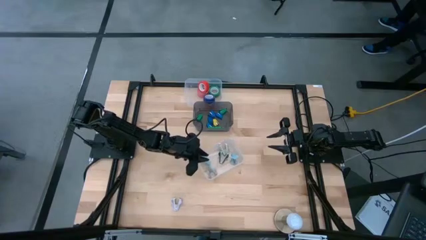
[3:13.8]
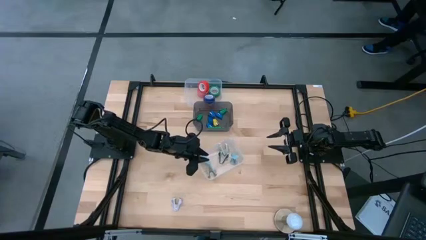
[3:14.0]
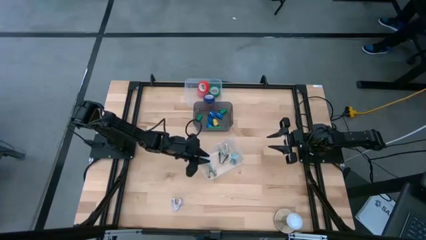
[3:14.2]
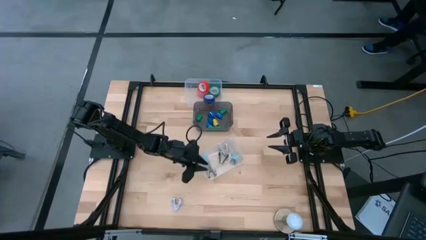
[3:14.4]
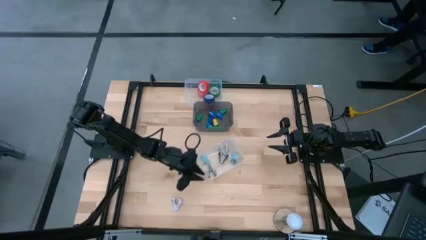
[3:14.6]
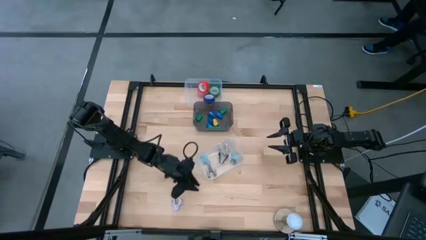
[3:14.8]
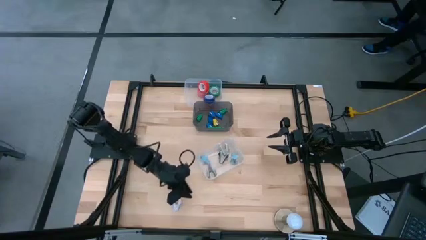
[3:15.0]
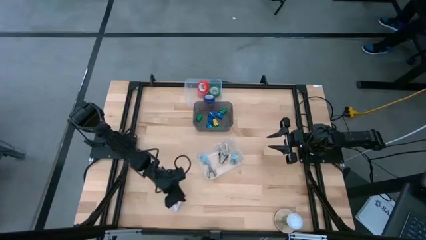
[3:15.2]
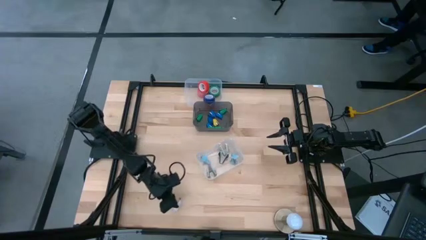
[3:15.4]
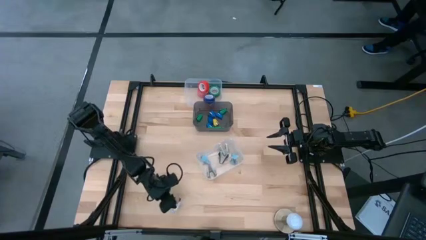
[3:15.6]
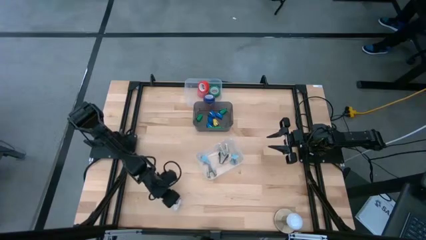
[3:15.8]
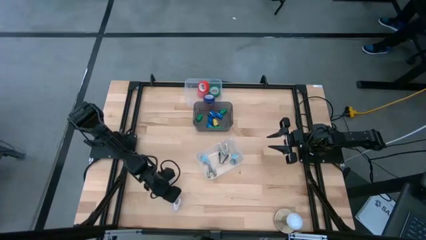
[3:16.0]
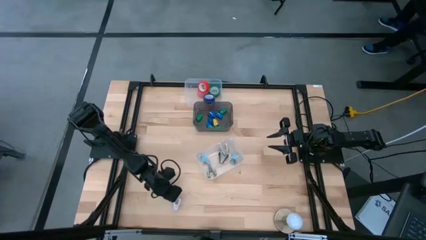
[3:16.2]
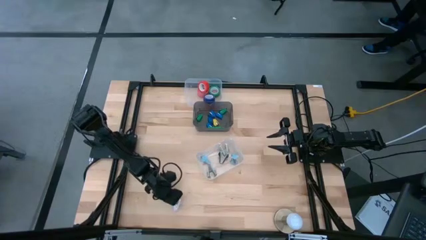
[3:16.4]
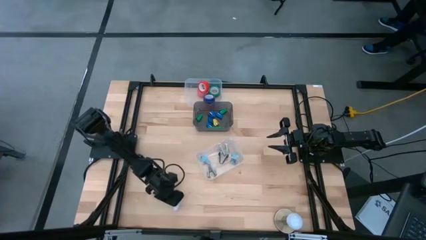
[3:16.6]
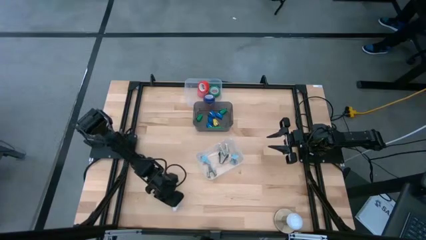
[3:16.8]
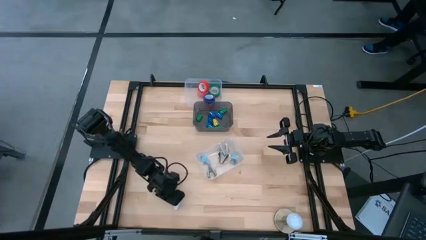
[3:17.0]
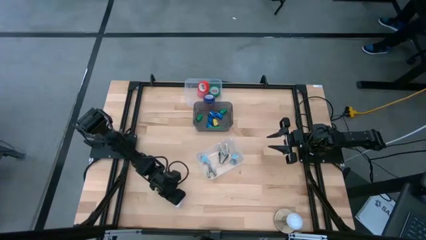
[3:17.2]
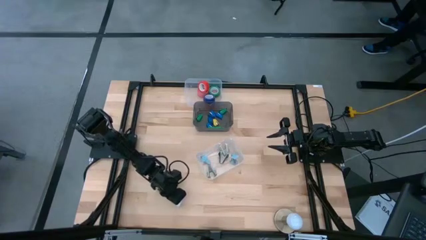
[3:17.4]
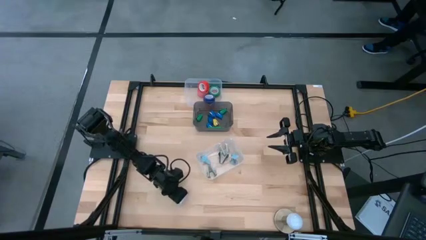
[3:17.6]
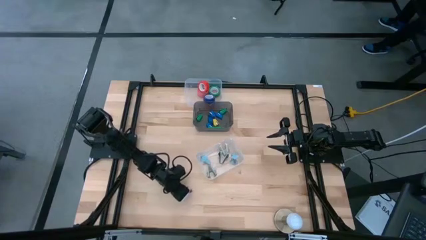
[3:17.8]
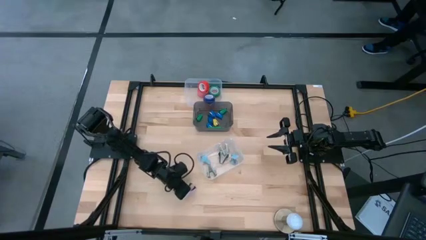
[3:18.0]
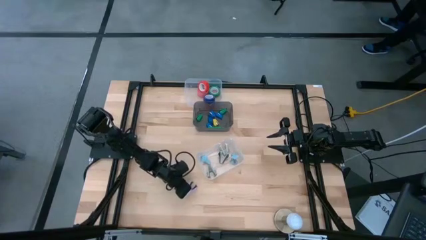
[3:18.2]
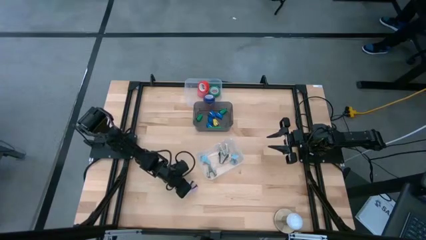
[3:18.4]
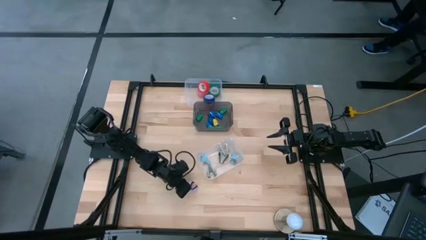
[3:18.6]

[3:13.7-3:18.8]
Task: Pick and place Stapler, Stapler remover, tape
Put the purple staple remover into the bottom transparent bin

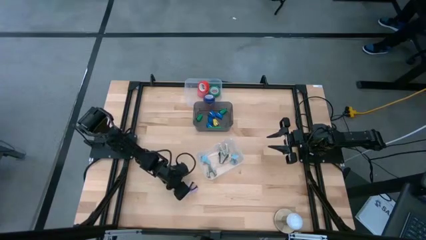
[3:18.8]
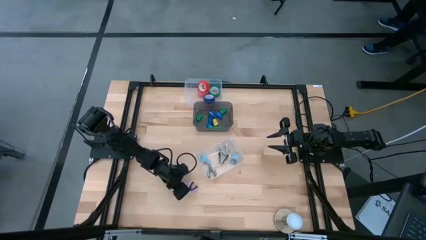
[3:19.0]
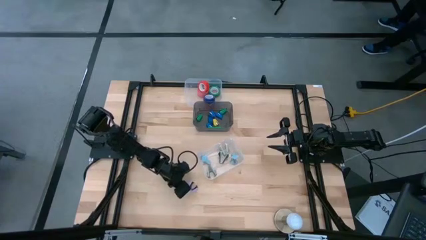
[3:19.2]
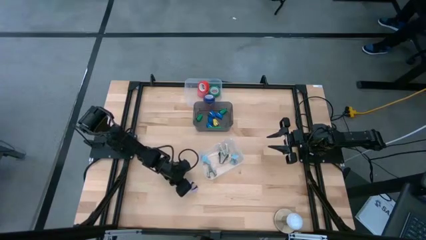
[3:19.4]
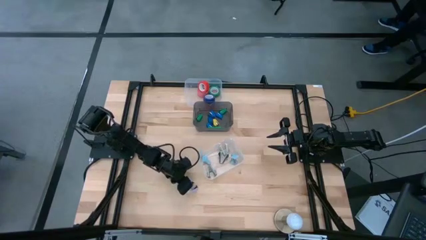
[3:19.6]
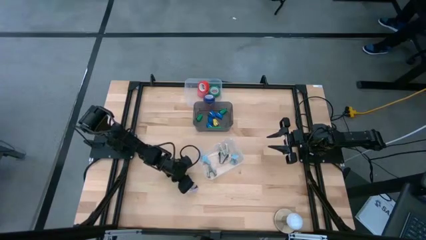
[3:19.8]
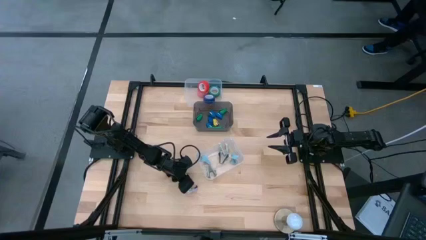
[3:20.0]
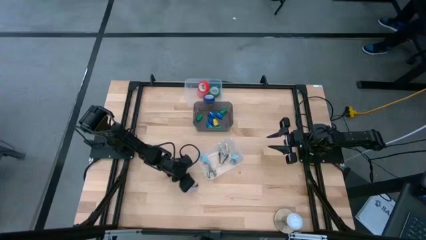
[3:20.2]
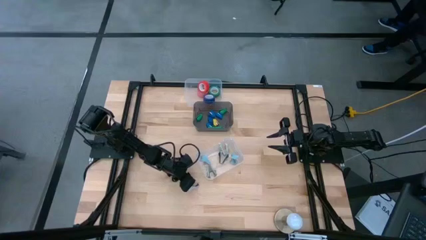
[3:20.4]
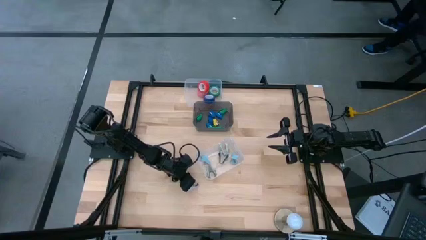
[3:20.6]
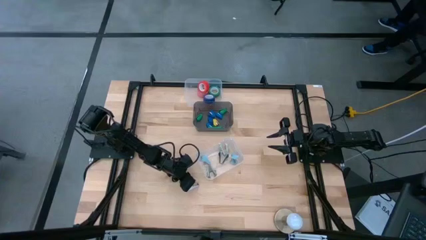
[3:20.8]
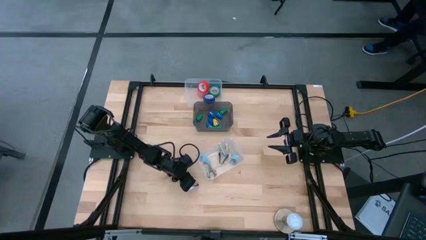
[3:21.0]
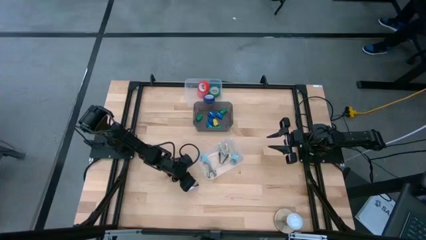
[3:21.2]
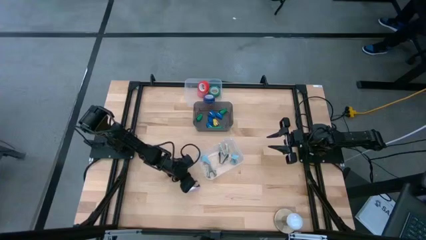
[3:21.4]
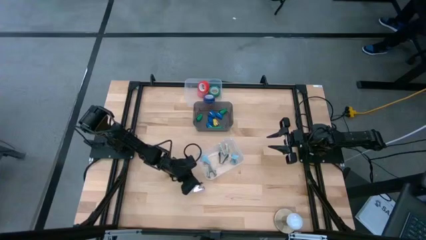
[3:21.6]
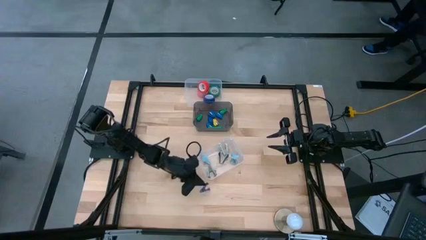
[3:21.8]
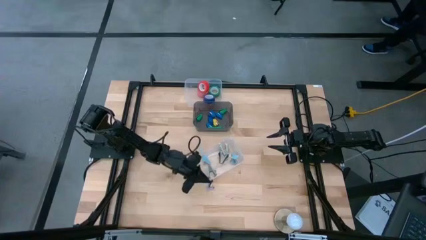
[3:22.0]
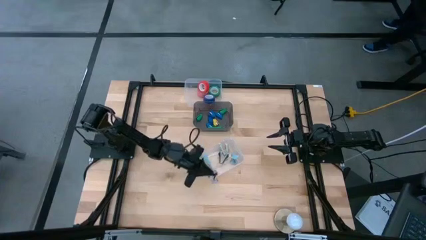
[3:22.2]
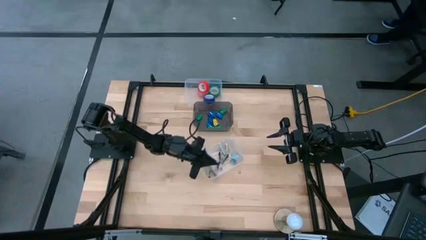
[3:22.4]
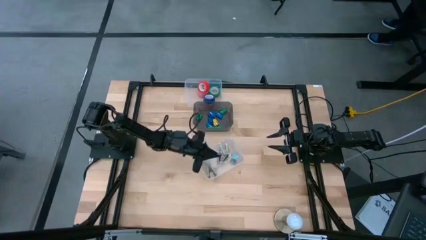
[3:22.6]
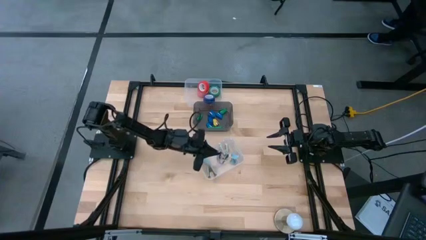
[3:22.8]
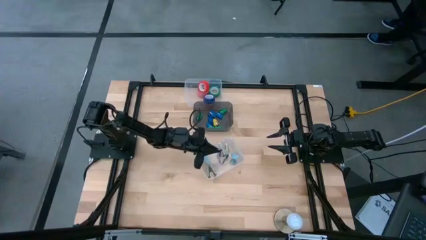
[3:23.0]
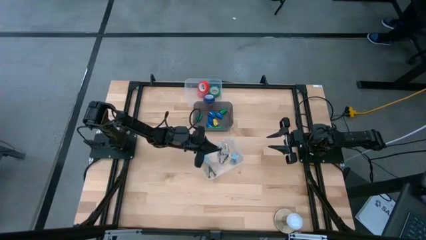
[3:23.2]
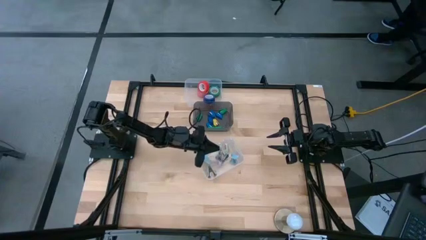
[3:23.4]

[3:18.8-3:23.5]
Put the purple staple remover into the bottom transparent bin

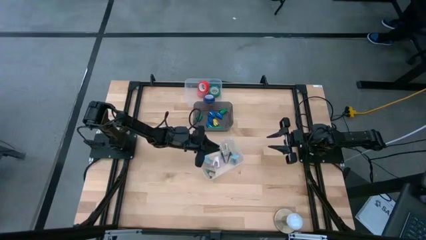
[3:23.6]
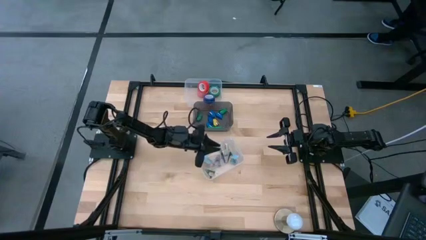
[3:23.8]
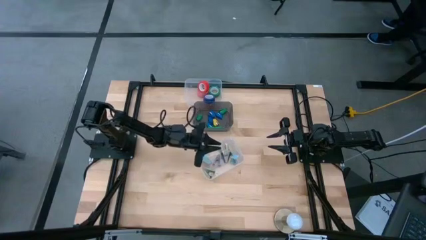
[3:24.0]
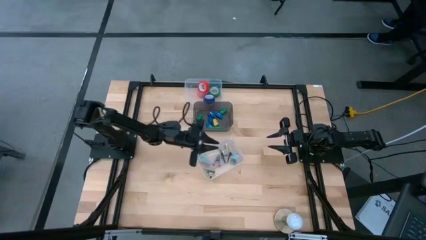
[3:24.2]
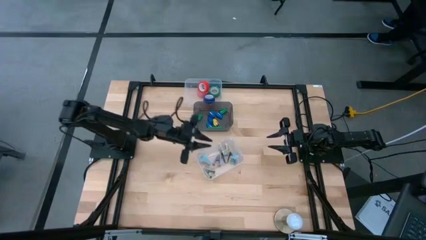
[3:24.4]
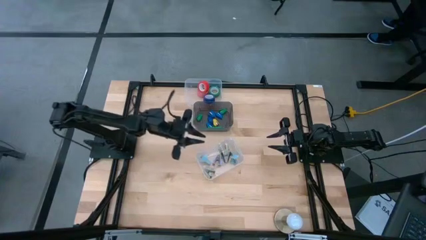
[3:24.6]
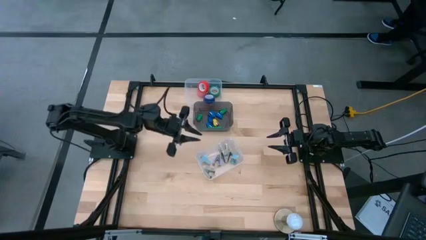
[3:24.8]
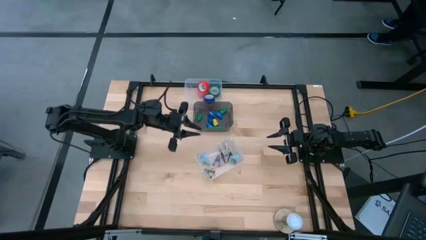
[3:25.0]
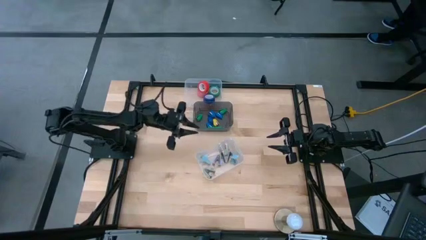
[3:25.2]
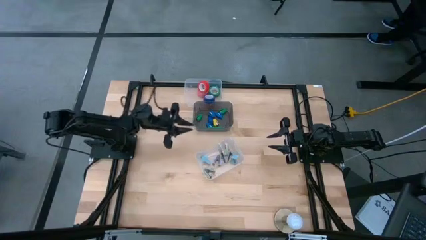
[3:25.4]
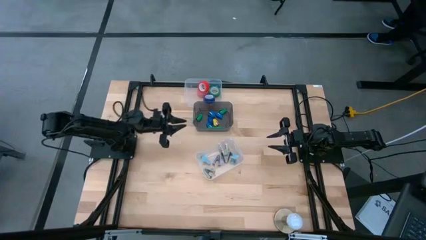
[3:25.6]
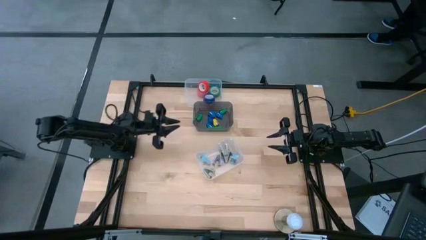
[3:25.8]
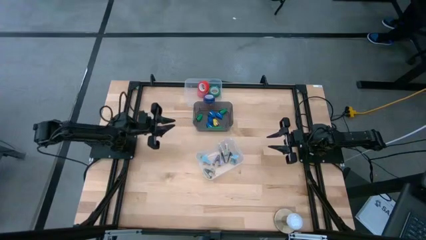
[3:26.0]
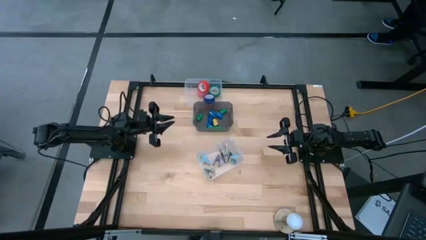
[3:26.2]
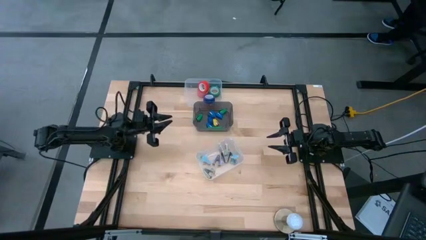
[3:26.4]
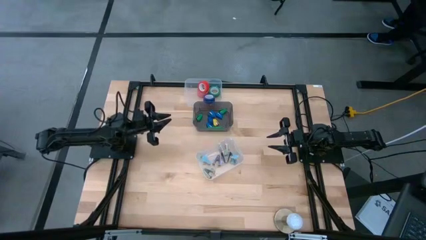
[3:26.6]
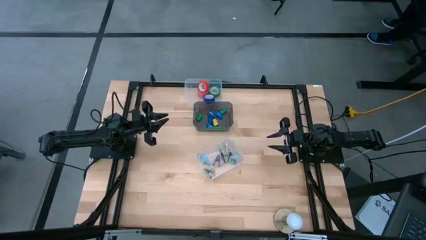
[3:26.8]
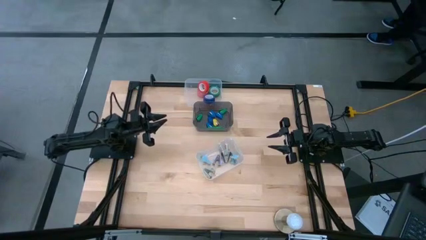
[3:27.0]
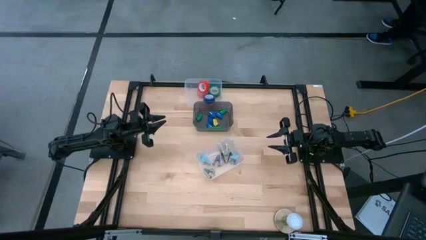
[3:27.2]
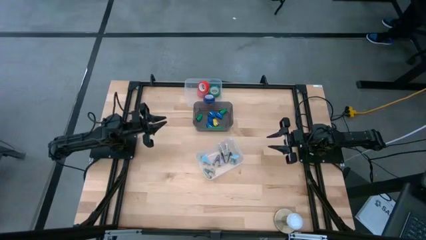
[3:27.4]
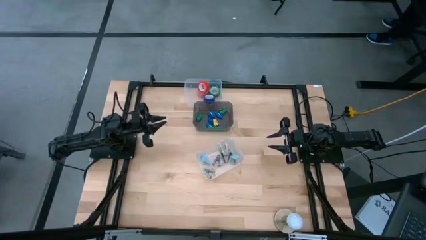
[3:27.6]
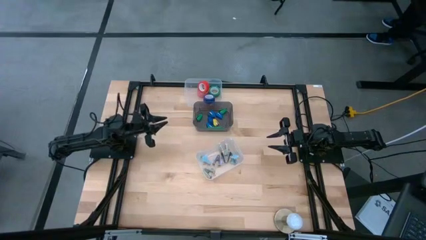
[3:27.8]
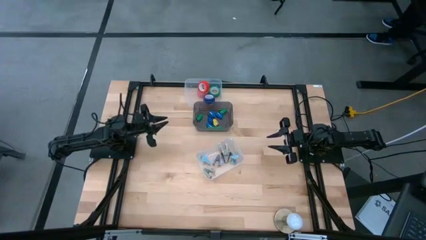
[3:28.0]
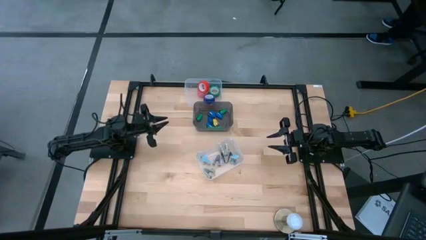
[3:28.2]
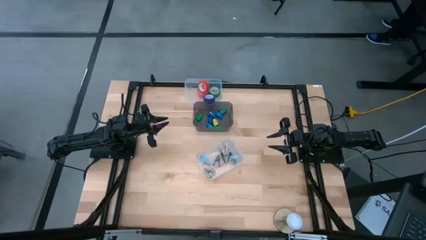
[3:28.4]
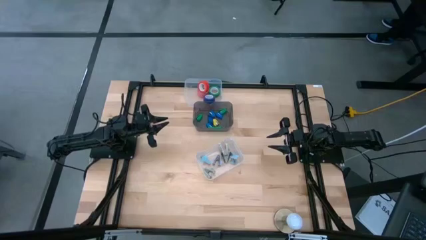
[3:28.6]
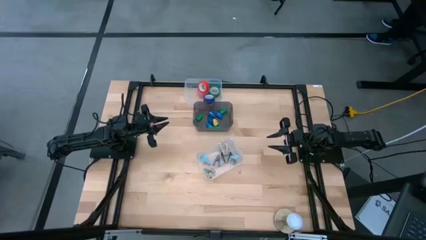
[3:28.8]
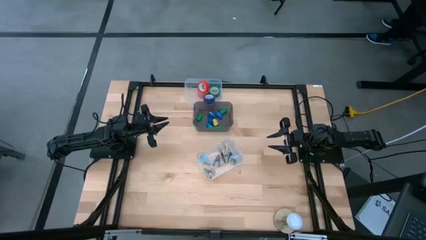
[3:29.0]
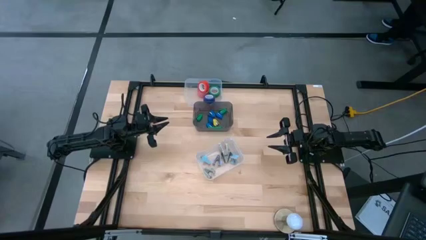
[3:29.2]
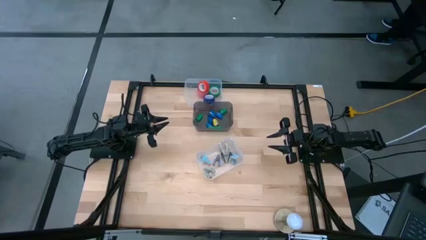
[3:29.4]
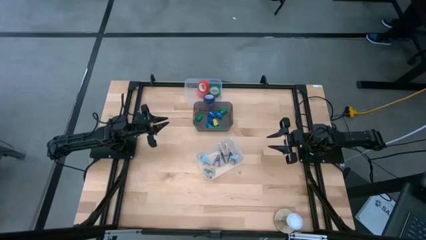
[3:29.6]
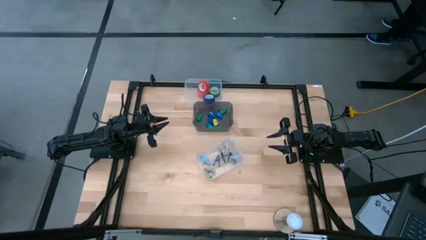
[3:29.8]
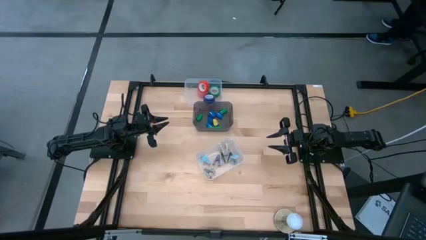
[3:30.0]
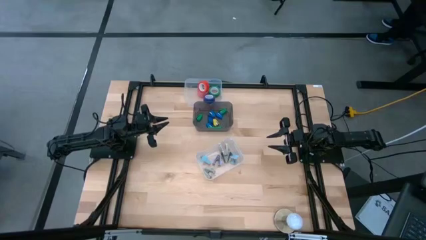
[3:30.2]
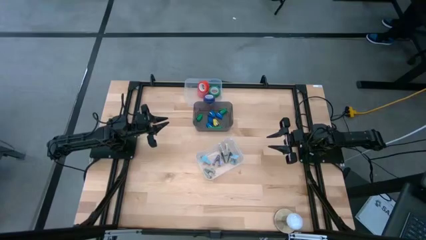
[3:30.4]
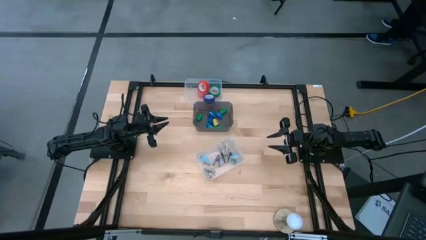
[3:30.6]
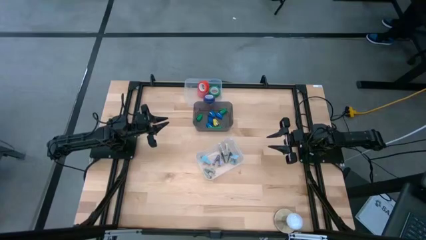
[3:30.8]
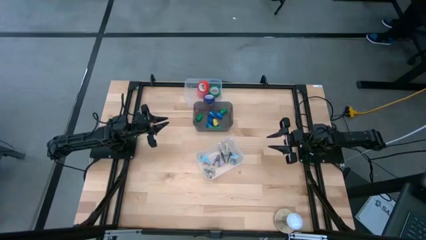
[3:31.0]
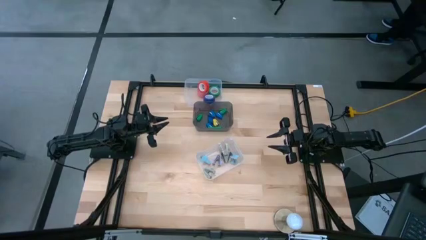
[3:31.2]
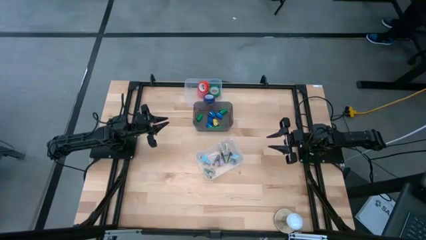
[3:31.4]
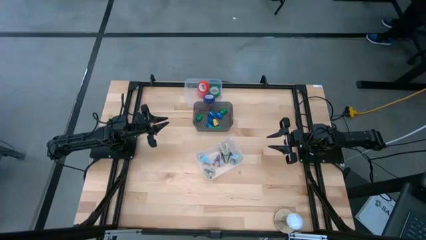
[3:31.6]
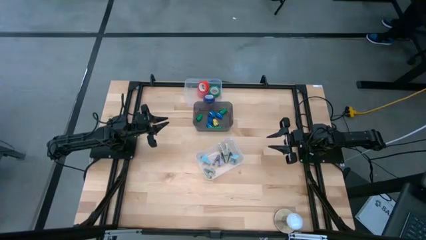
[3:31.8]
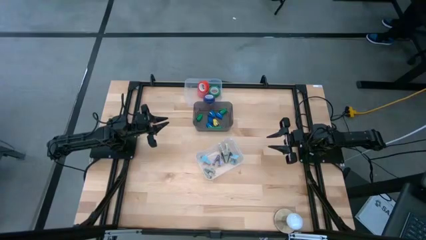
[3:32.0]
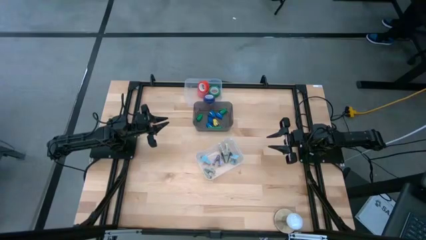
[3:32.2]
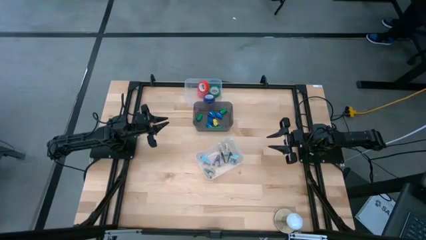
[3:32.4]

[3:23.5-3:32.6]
Return to Home Position
